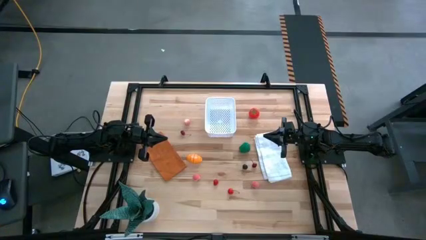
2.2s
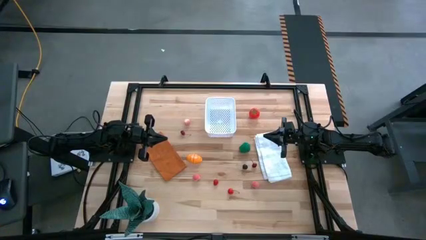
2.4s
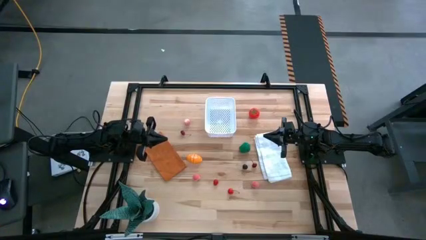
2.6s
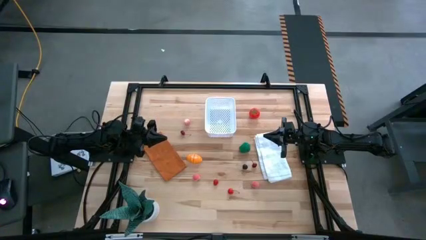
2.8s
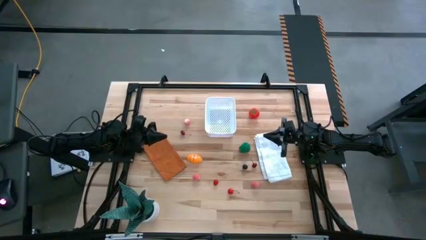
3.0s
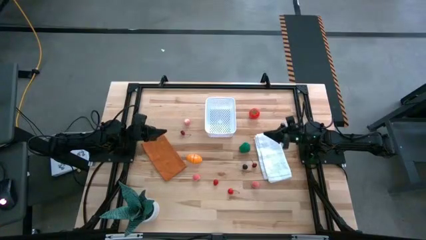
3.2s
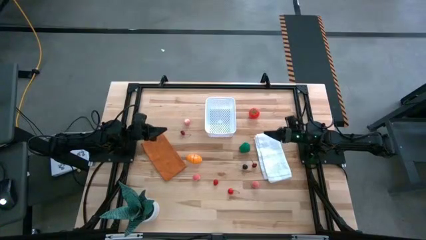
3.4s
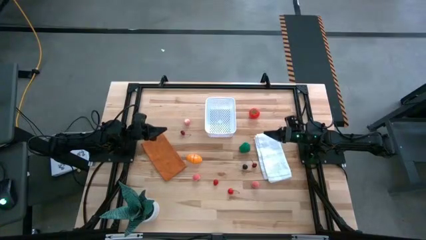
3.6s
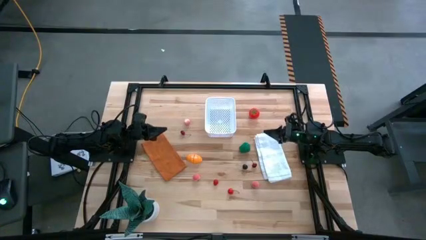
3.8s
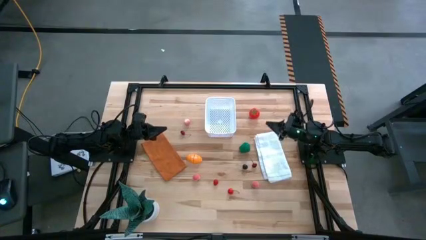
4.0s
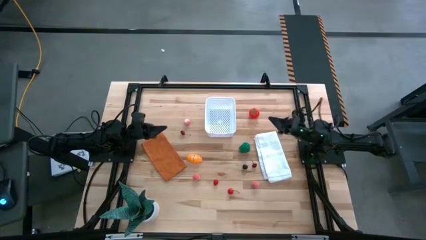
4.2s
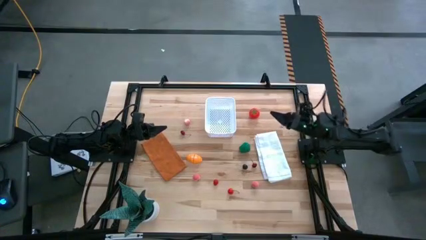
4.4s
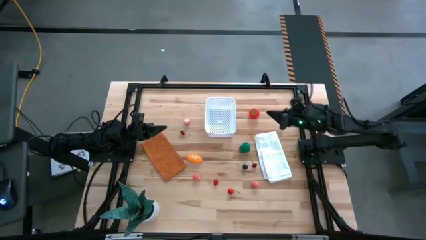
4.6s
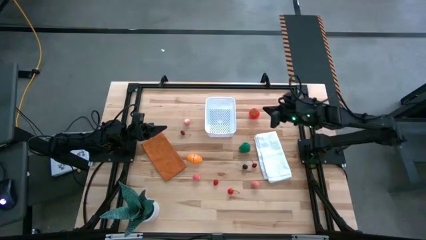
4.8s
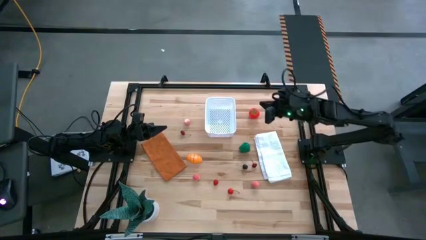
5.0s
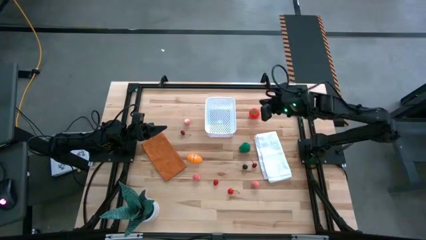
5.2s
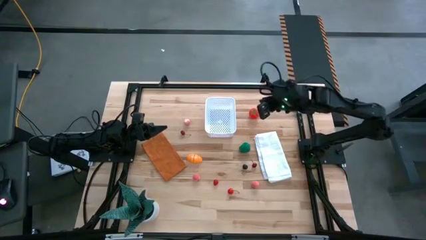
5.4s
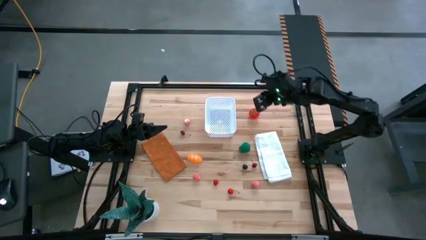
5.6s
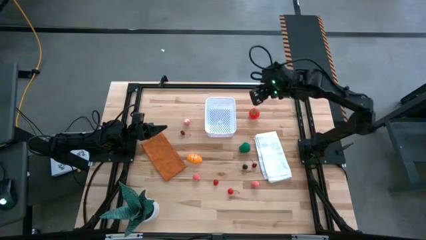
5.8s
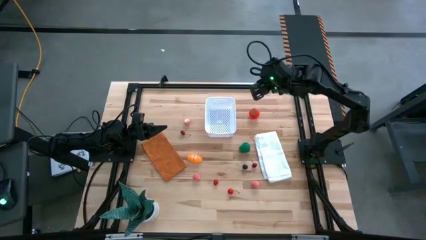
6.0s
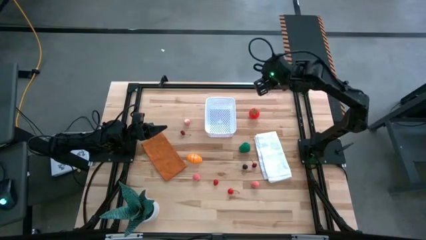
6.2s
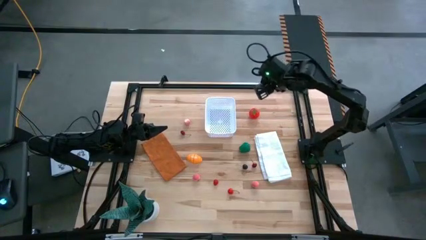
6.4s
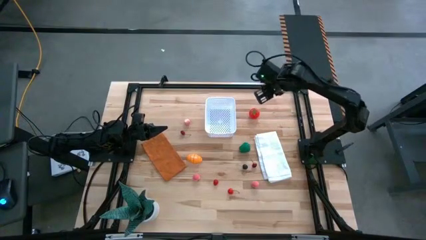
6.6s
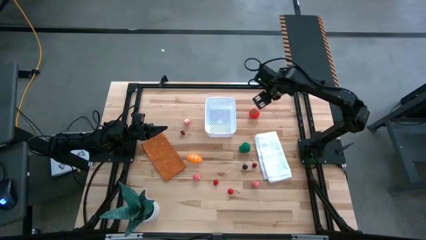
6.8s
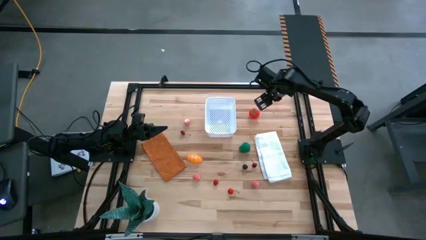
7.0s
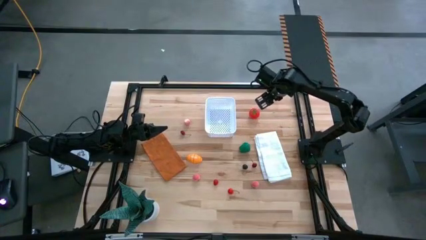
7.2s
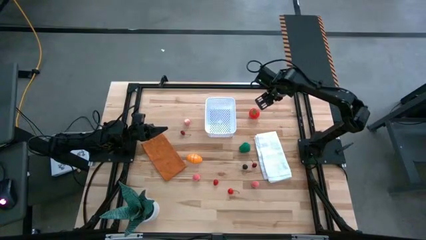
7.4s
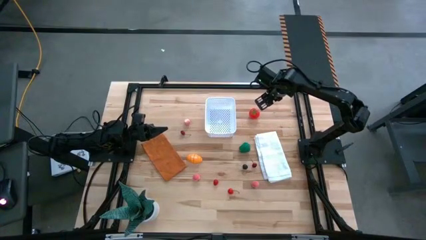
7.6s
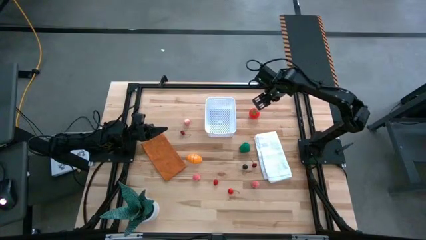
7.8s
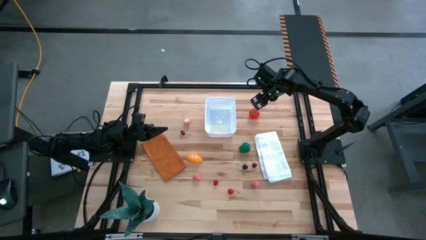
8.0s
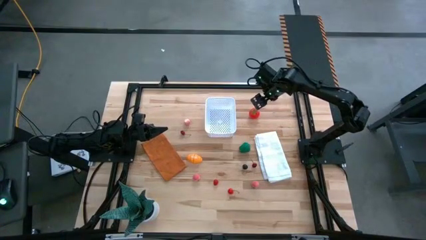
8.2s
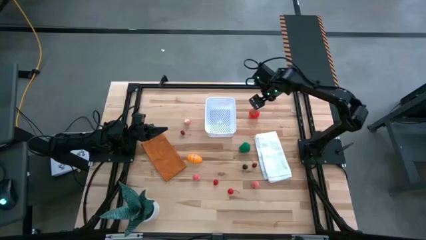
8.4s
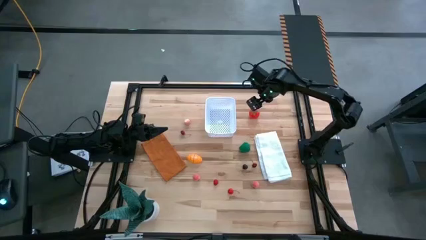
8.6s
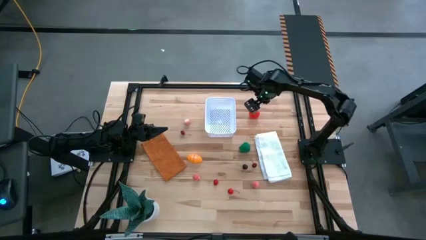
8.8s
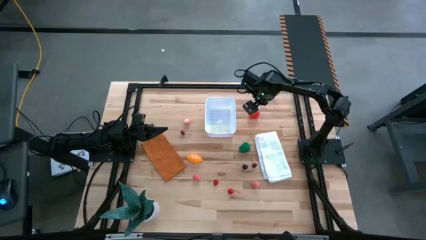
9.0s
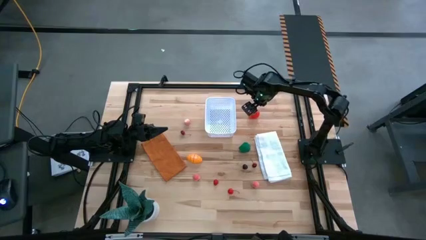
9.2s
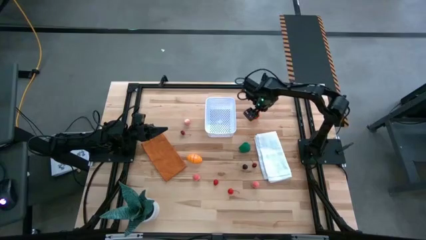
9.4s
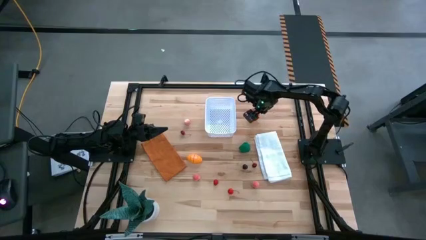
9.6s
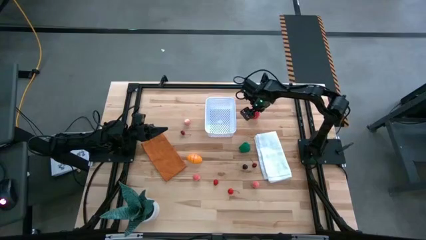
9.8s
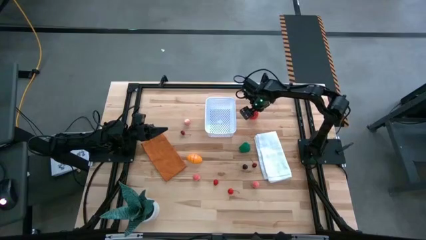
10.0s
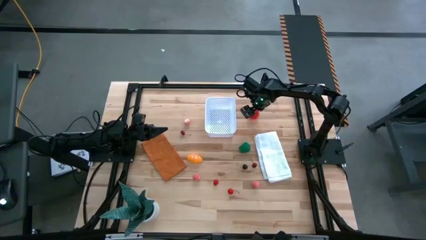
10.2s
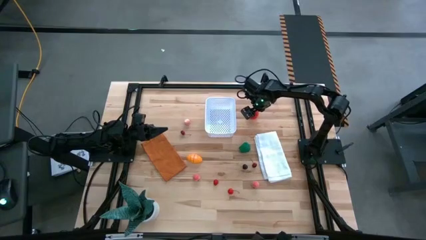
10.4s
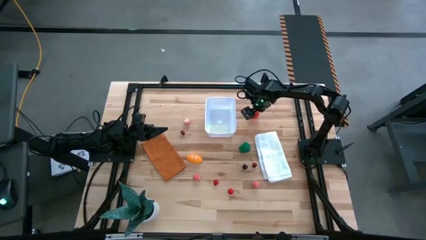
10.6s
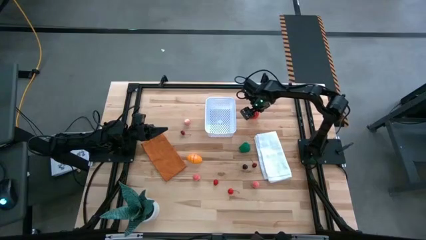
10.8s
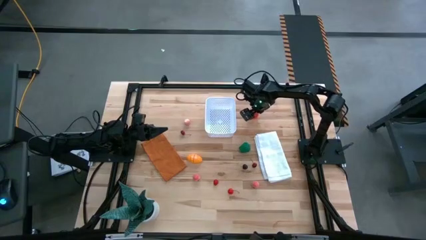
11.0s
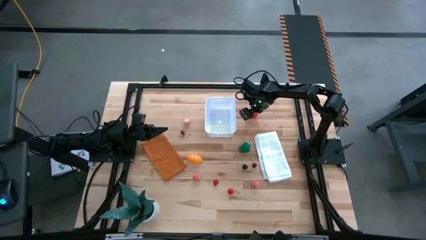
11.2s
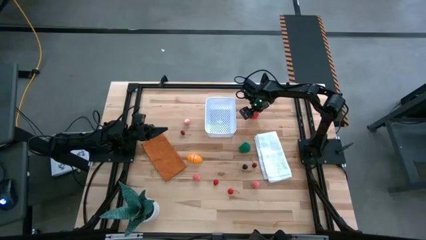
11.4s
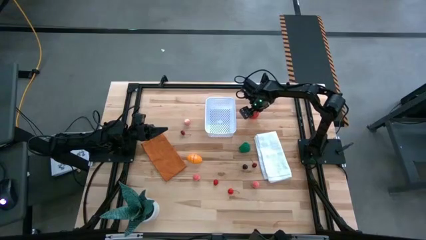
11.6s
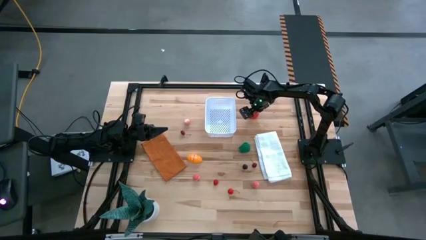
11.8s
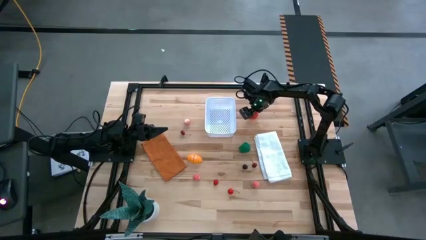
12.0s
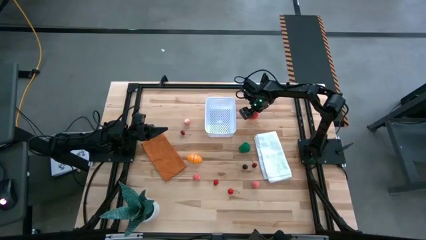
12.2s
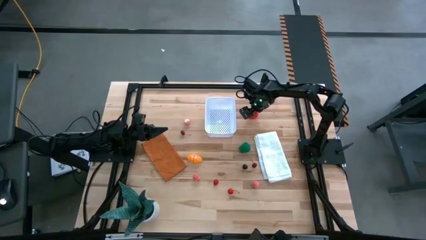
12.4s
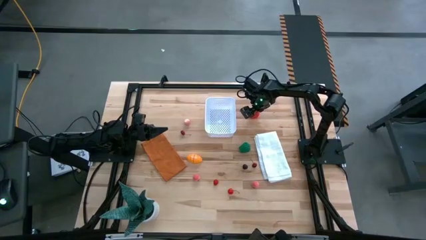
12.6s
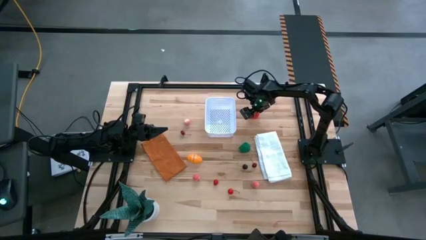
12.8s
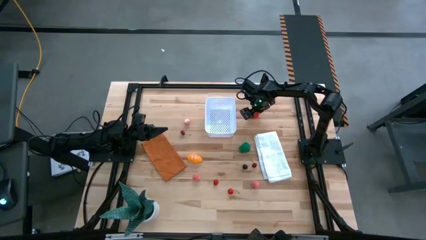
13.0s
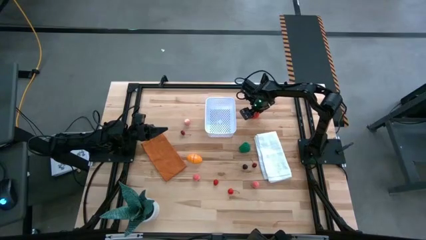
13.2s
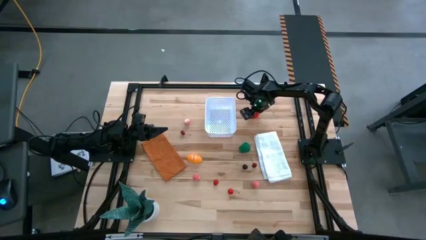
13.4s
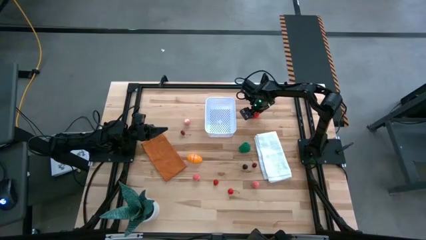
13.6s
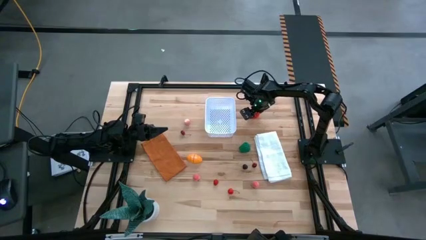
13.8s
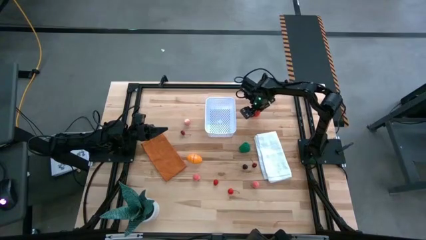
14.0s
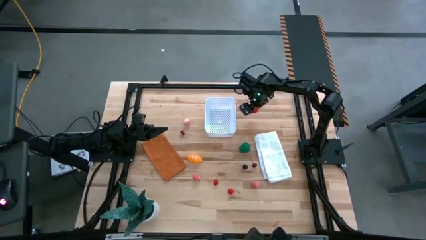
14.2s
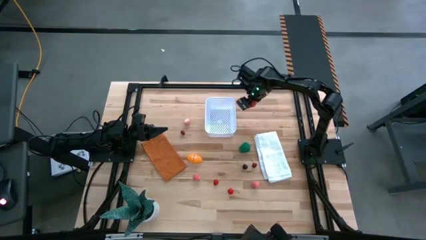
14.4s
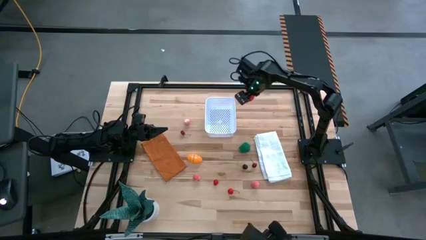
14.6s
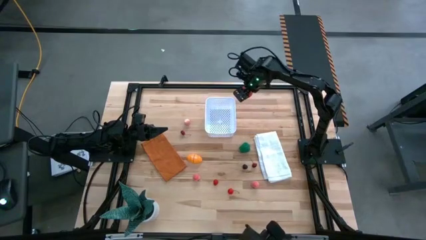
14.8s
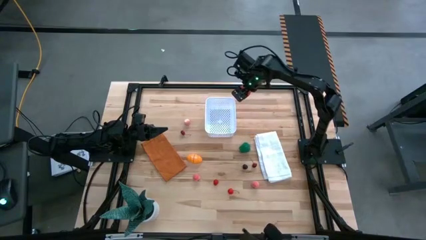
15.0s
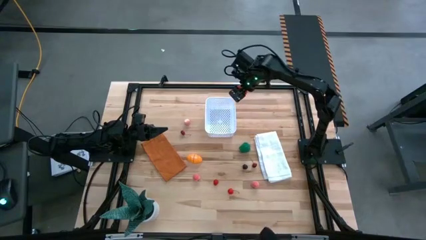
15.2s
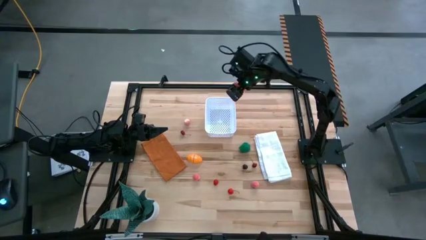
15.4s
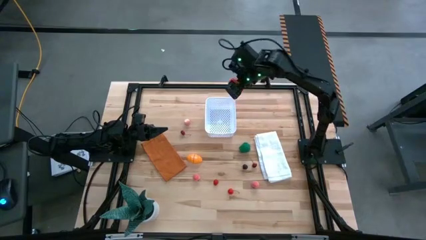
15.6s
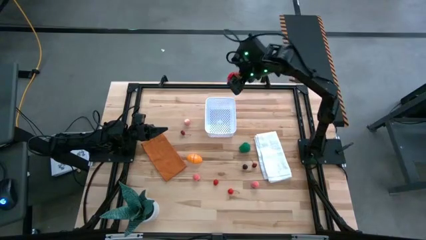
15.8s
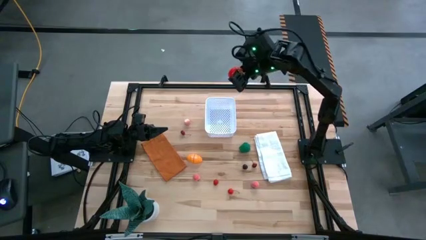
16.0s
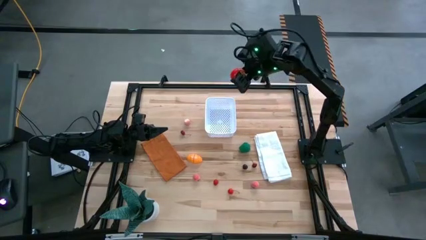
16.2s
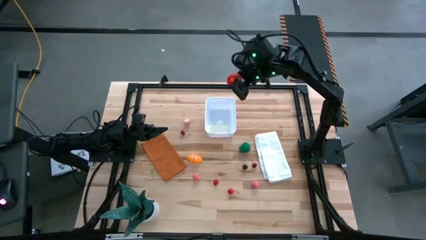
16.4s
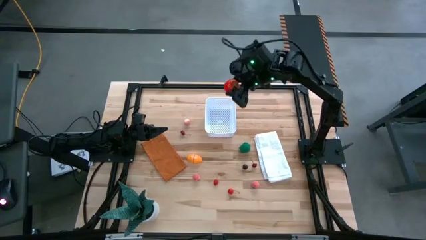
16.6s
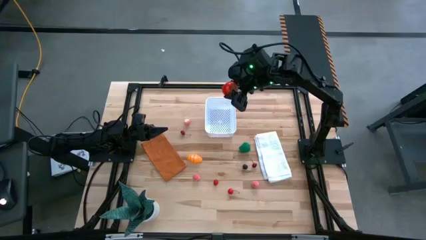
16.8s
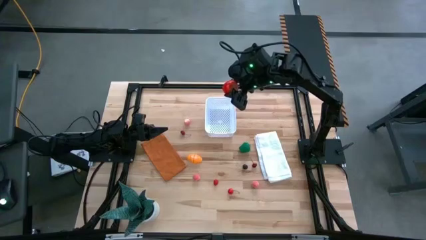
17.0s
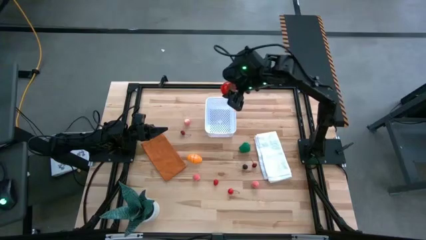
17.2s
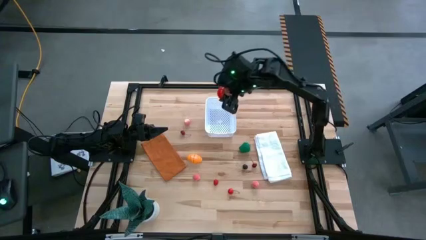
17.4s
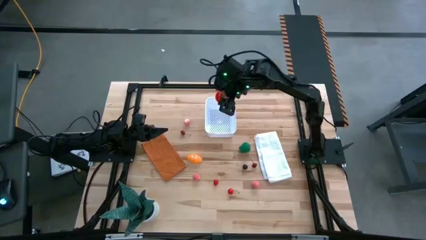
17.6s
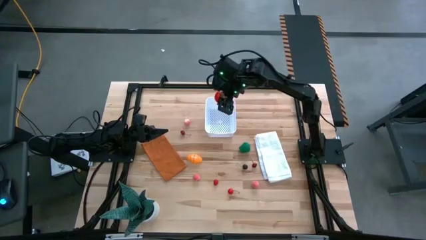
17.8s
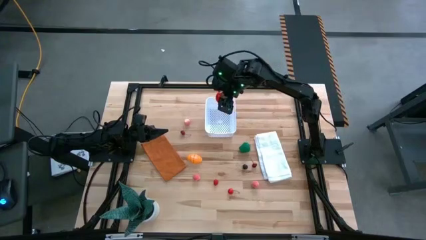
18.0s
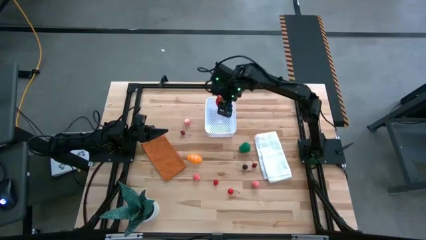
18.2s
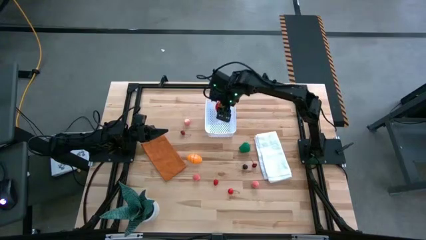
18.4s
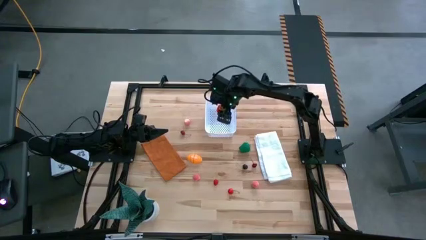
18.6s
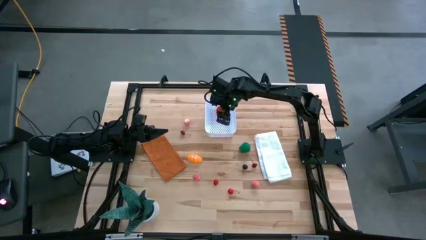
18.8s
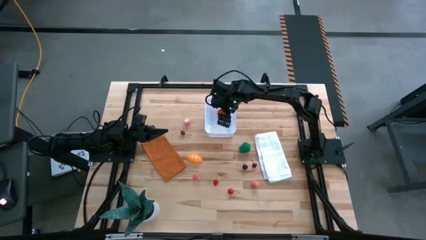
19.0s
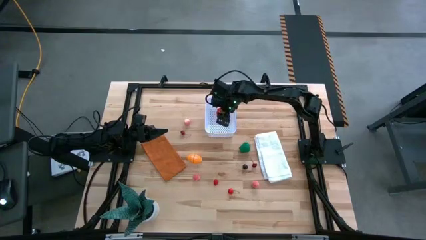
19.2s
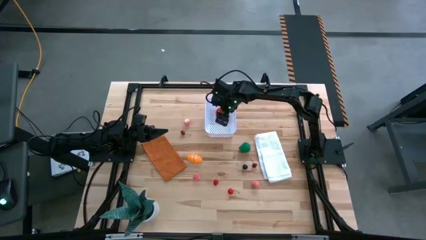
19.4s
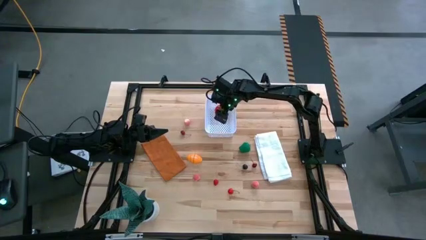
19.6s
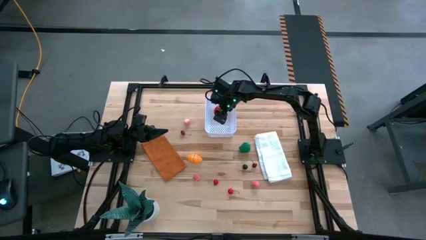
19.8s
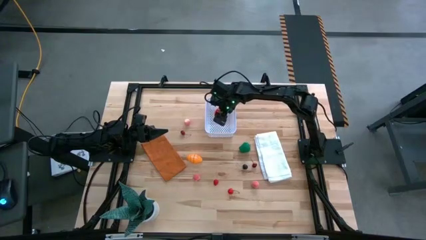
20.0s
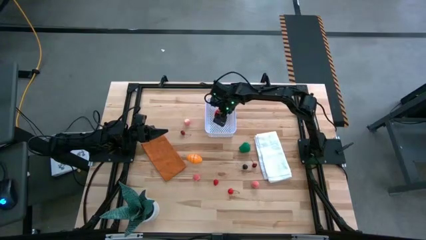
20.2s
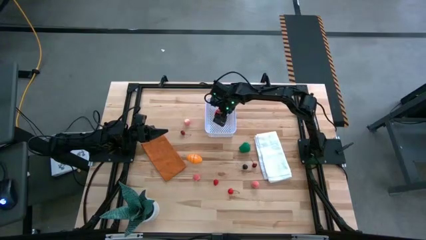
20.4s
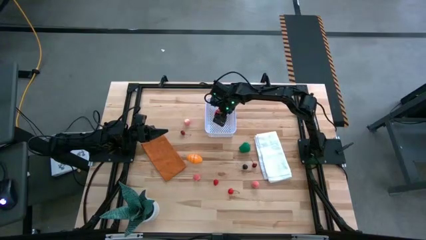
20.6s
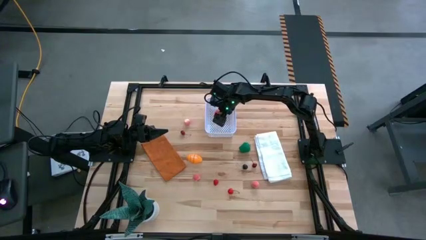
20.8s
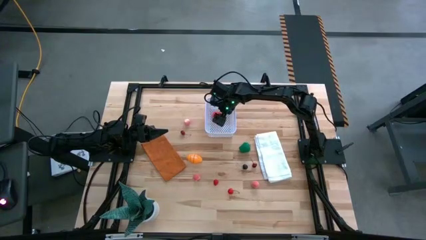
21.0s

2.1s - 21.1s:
Task: Pick and placing Produce into tupperware
Put the tomato into the white bin
